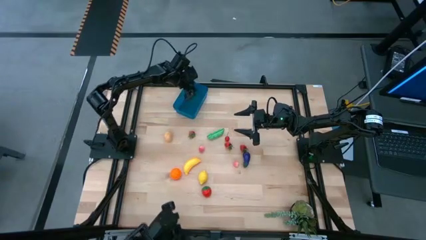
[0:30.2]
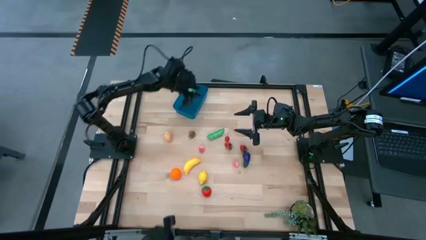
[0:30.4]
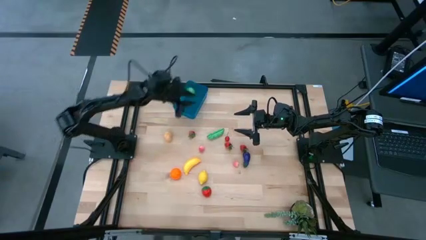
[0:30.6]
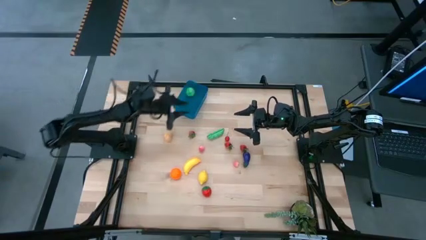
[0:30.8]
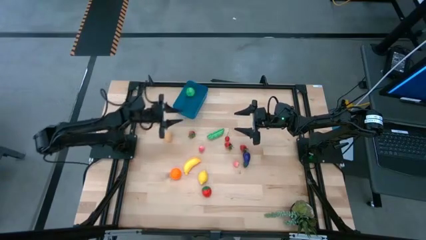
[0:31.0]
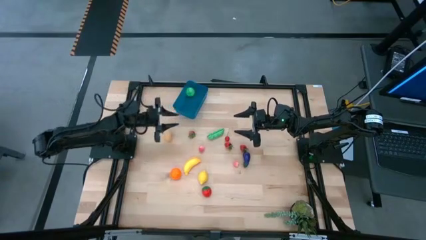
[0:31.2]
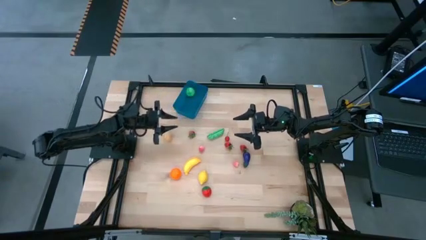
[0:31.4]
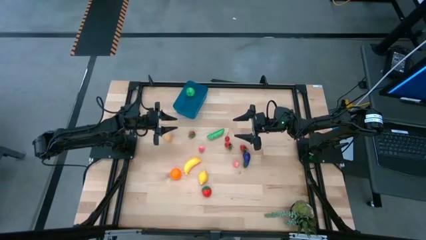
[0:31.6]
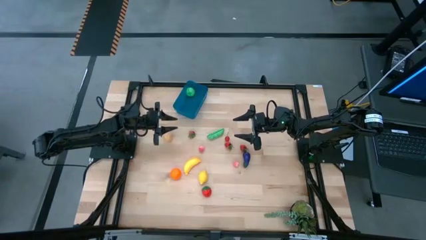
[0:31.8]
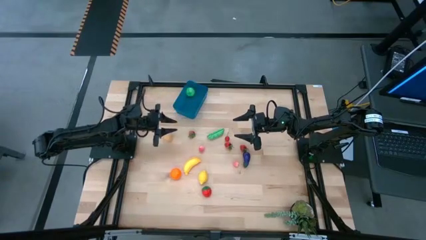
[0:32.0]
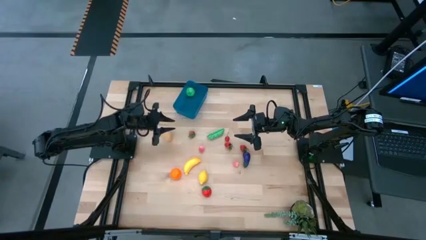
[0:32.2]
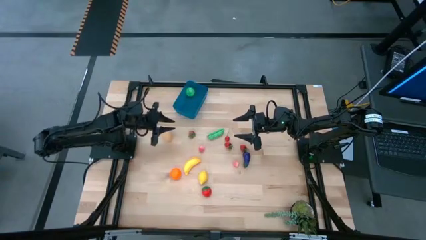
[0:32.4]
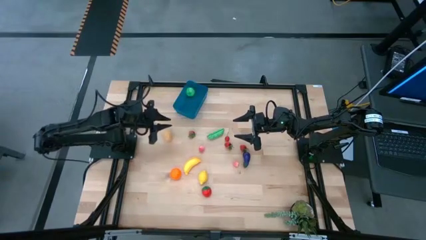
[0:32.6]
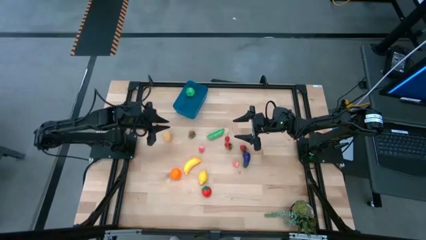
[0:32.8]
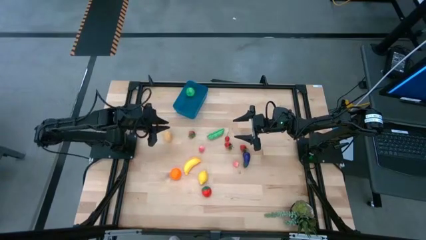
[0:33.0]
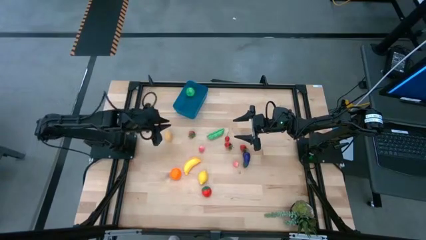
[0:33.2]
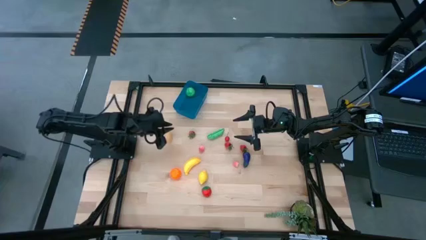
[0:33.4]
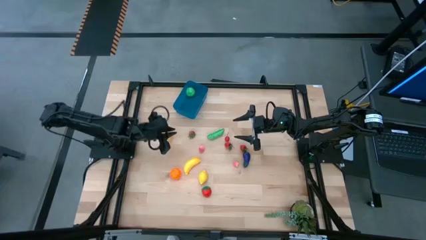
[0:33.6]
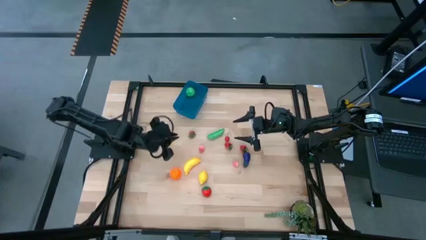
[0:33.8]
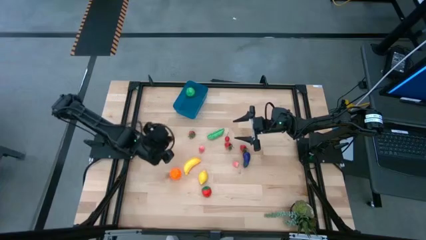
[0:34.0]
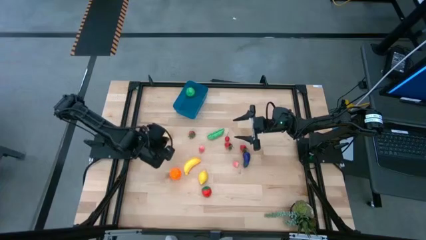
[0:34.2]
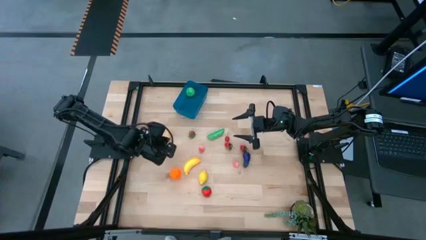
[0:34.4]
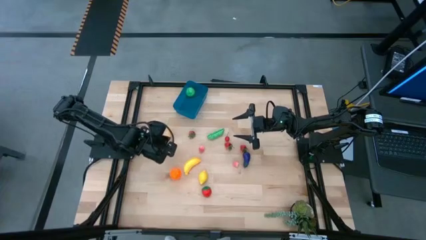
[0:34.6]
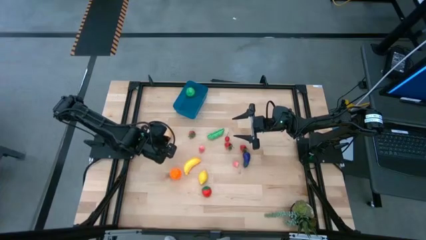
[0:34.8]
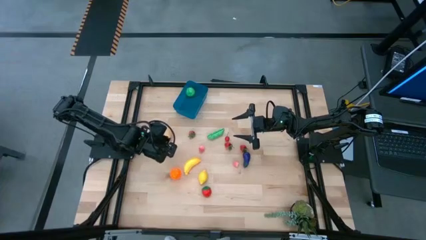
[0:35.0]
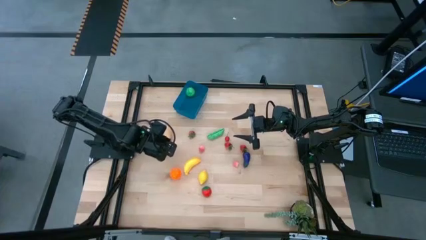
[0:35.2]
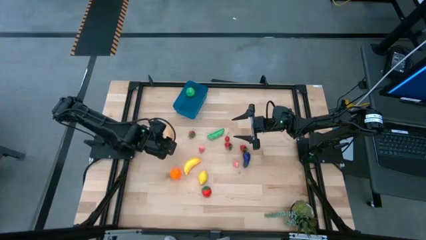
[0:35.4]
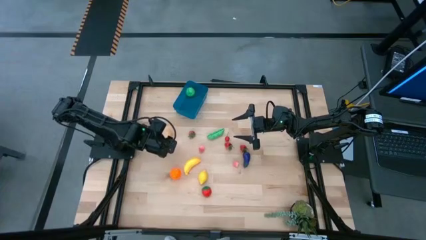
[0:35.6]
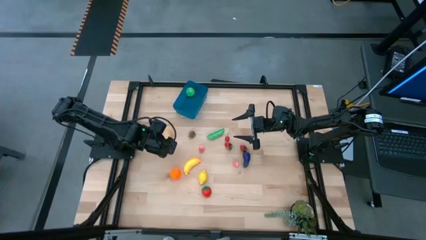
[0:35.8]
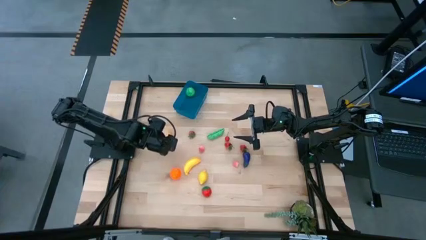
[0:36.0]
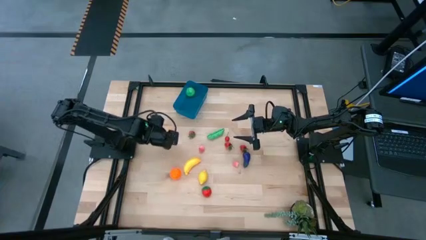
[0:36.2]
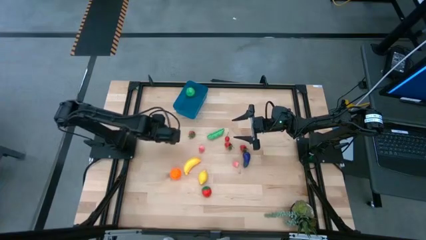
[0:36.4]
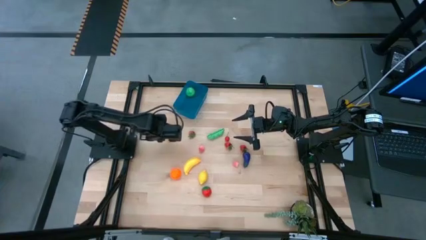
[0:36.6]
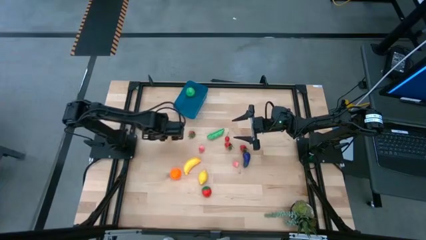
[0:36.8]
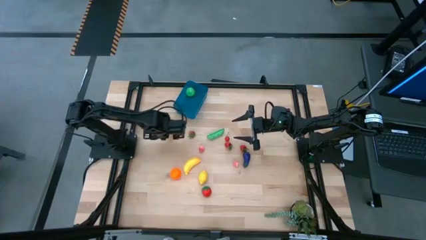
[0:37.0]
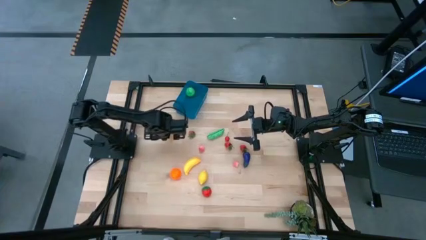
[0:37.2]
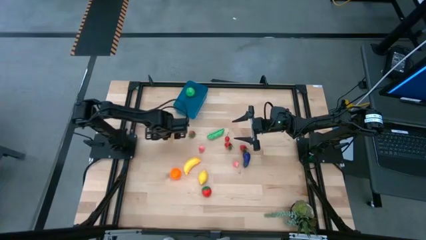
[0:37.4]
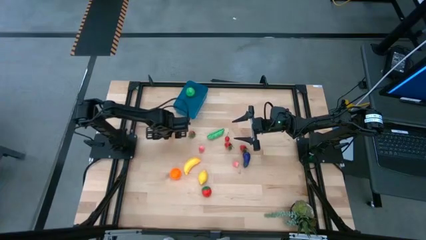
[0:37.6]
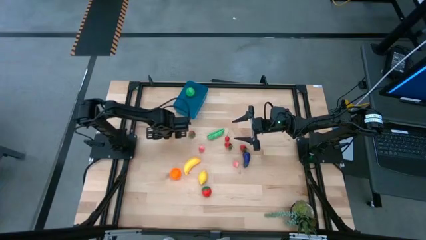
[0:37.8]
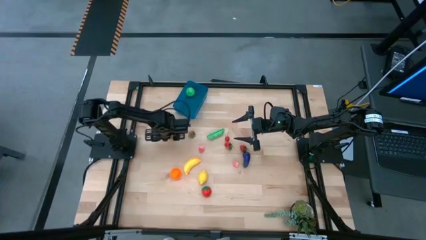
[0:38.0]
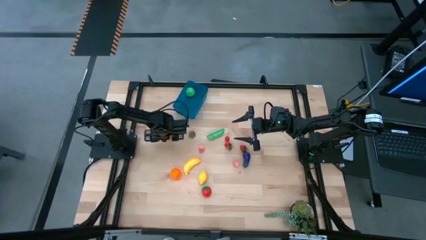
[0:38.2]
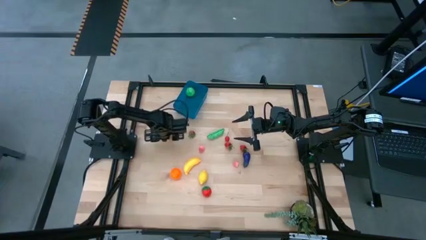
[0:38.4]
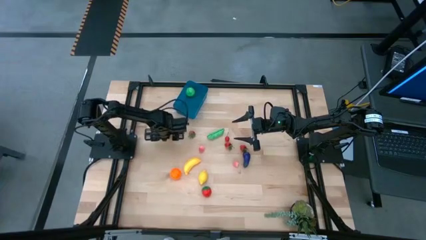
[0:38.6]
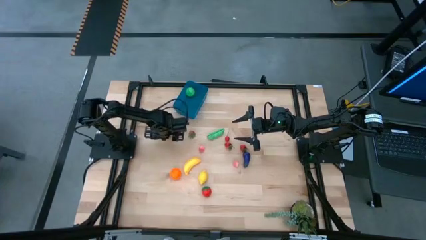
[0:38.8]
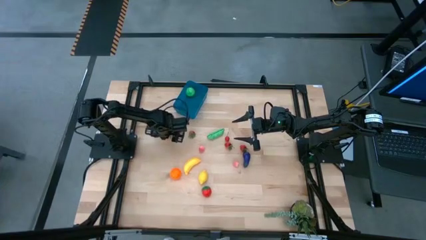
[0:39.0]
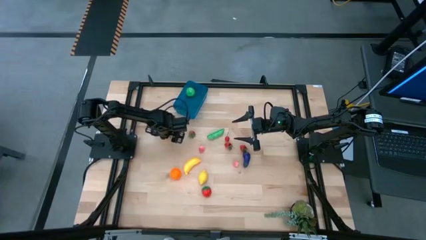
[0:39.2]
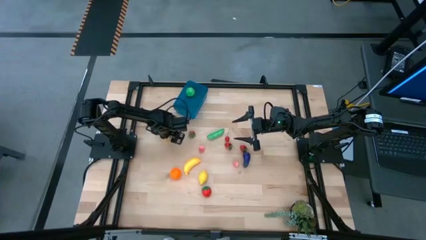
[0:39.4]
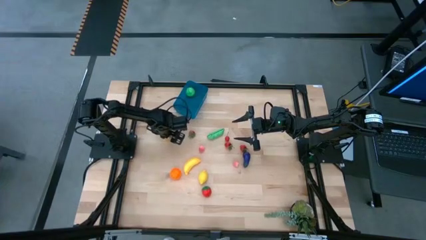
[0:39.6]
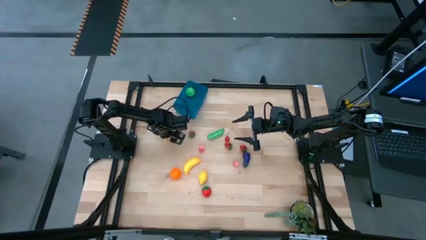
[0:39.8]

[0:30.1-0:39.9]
Task: Pick and placing Produce into tupperware
Put the brown potato into the blue bin

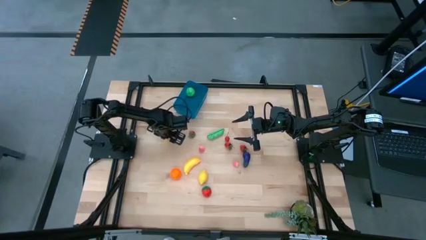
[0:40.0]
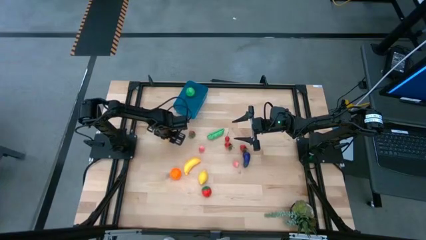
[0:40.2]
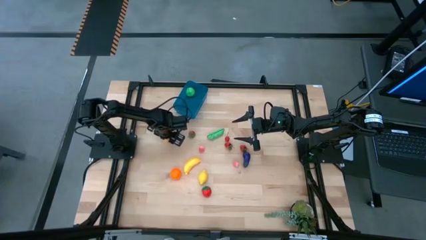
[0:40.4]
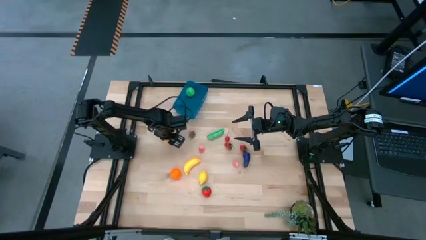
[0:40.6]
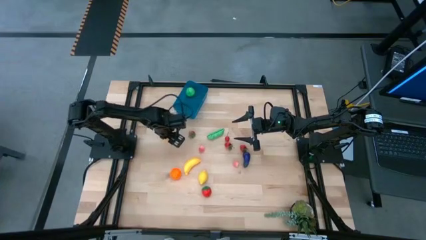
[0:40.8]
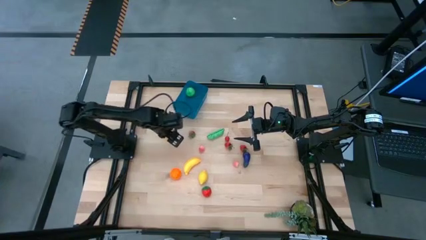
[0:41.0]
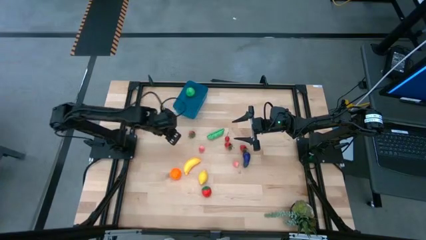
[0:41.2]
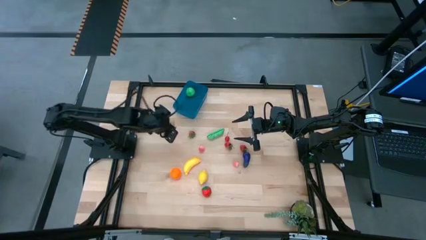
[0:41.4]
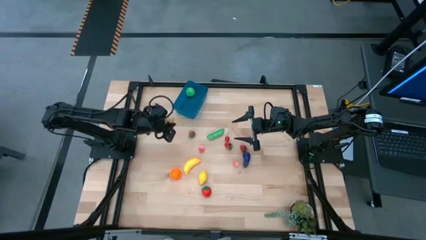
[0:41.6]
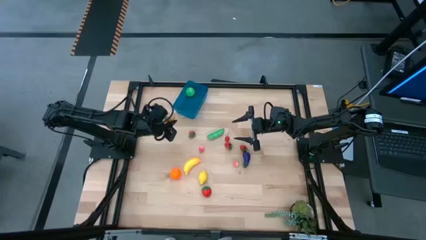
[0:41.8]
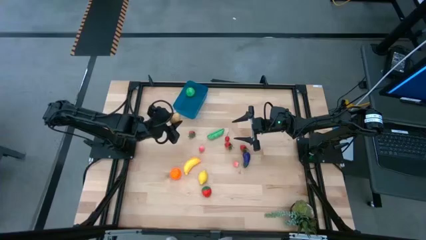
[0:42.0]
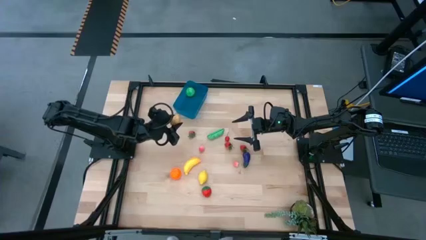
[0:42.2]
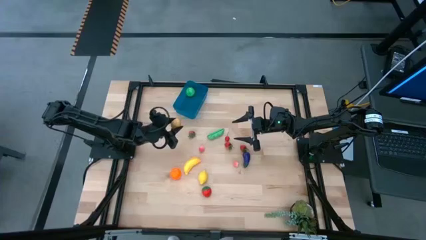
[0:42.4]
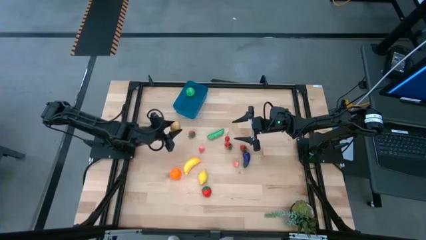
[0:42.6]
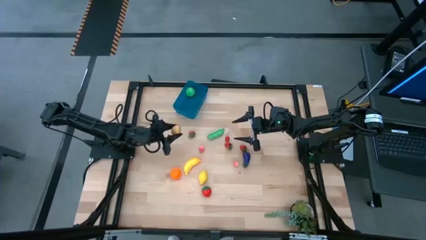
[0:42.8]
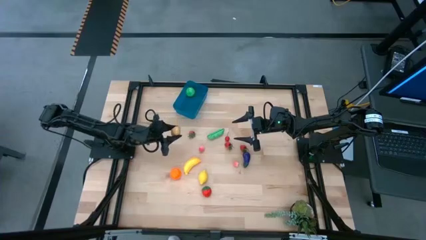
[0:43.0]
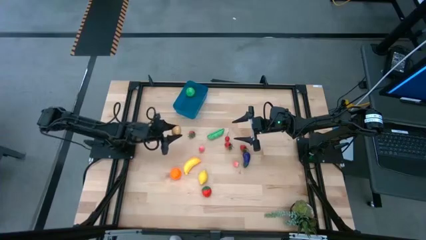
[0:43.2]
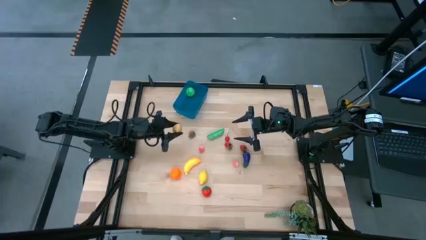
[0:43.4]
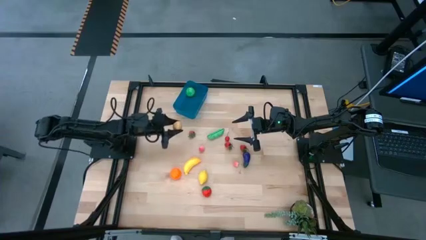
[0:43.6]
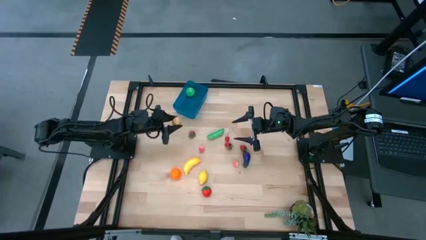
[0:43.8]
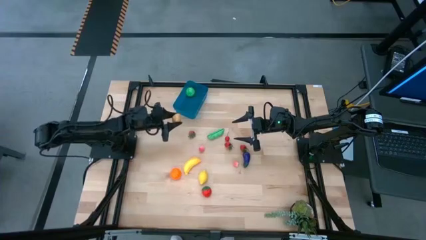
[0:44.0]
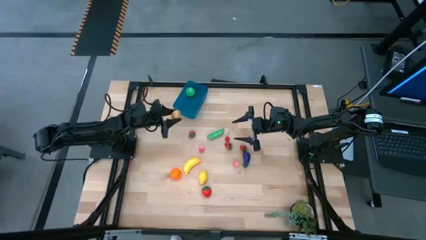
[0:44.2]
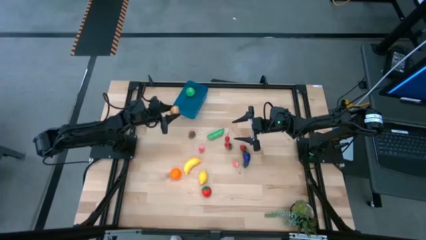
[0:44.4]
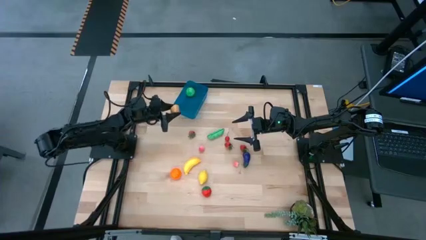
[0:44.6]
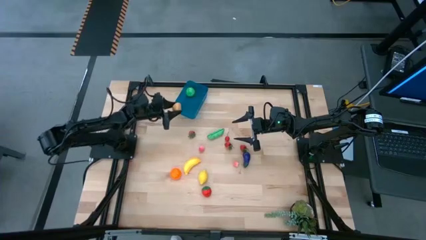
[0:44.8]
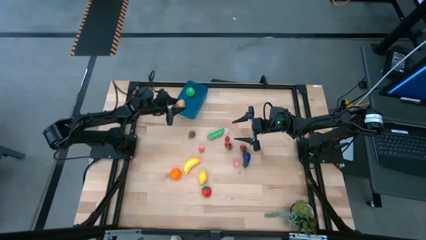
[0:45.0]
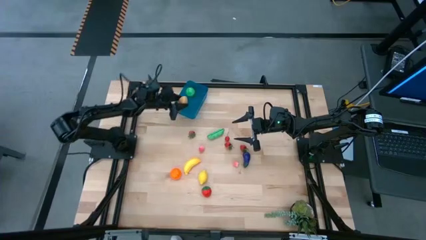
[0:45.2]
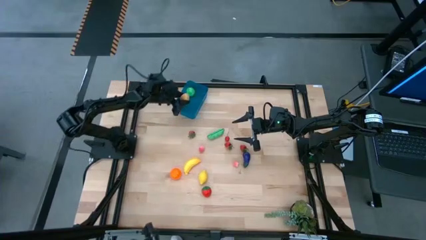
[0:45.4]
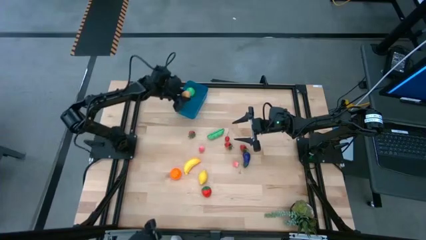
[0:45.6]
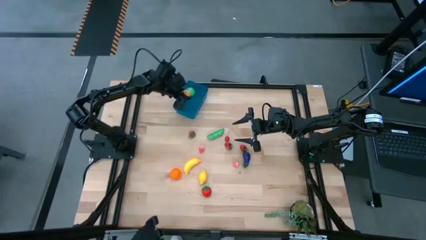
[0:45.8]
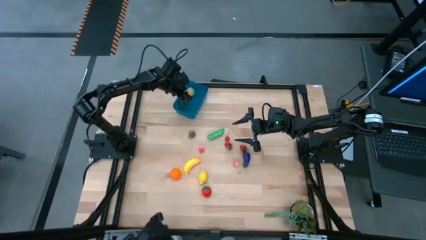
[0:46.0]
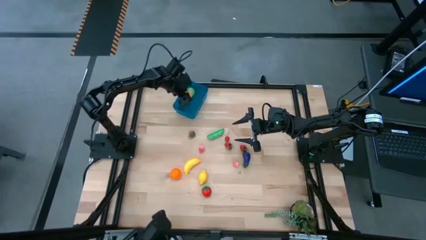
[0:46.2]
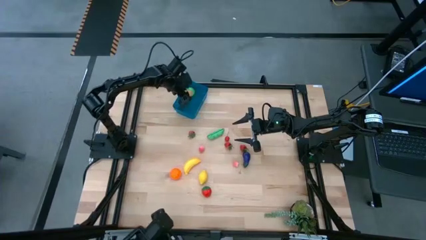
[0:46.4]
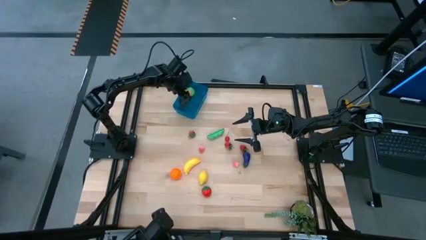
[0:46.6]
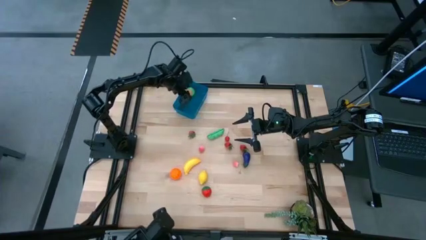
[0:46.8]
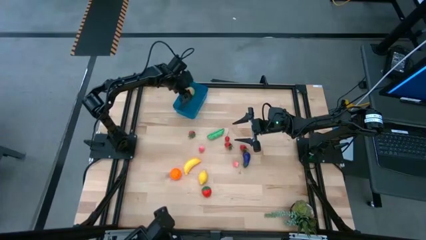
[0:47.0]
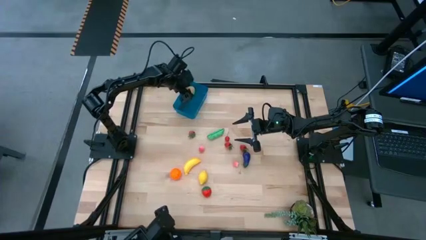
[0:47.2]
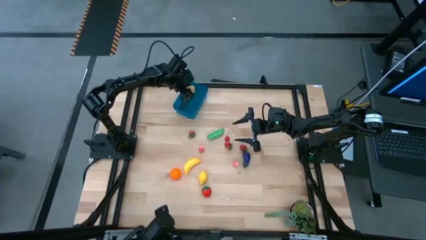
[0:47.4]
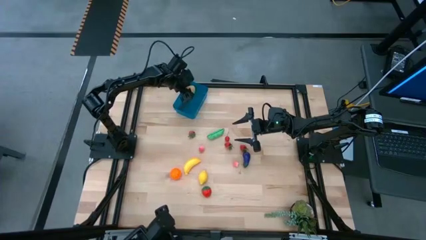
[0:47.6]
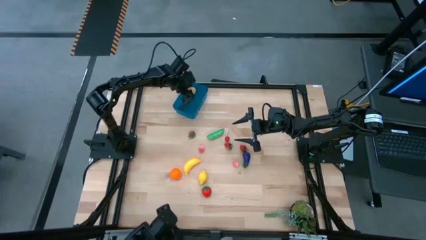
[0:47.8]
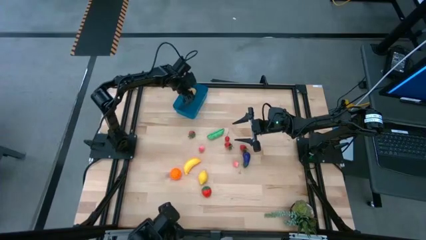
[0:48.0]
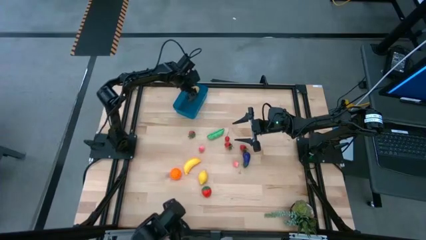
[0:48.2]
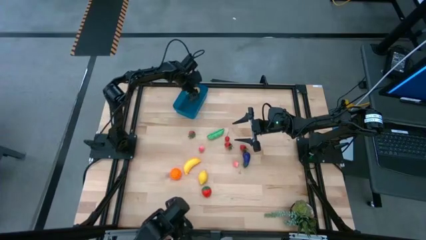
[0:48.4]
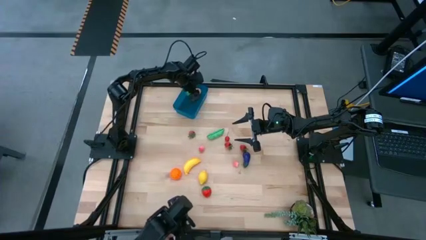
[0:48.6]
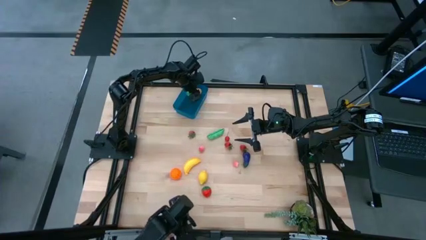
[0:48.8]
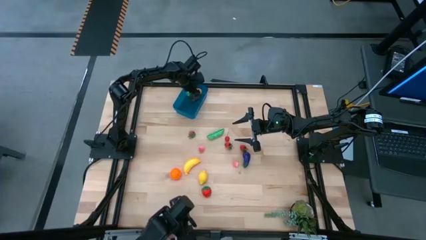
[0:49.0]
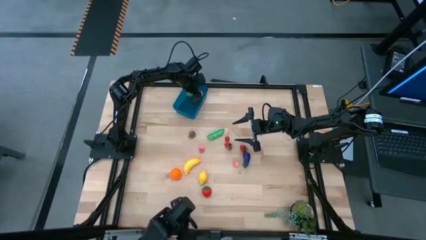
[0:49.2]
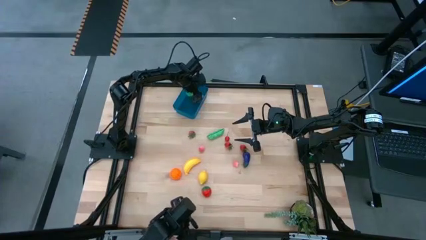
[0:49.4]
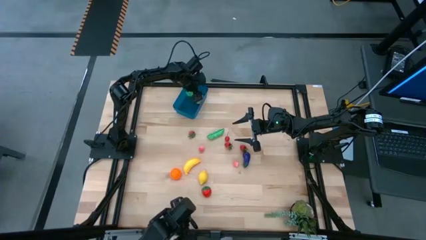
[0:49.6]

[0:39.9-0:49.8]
Put the brown potato into the blue bin
